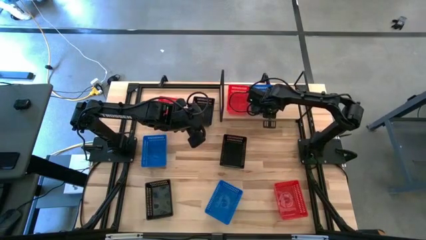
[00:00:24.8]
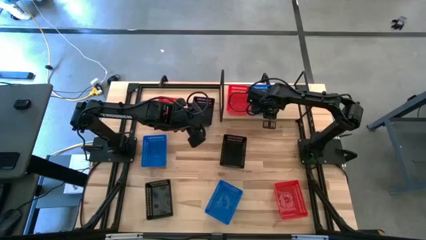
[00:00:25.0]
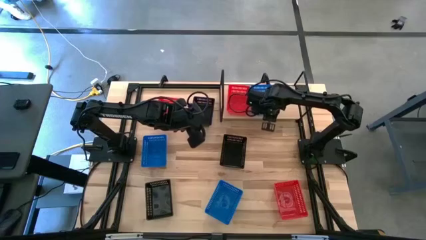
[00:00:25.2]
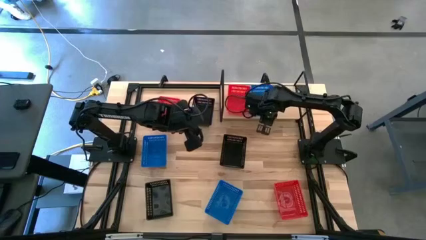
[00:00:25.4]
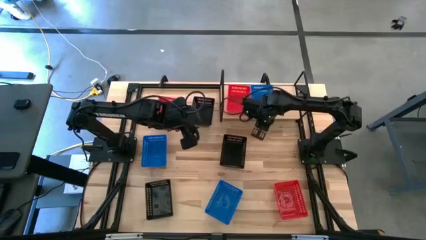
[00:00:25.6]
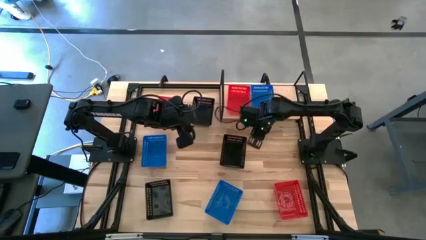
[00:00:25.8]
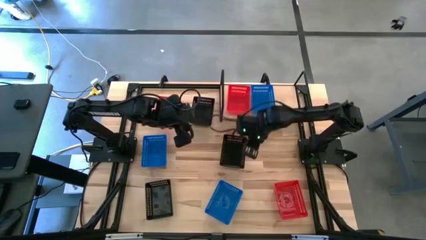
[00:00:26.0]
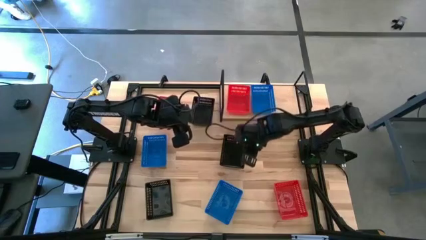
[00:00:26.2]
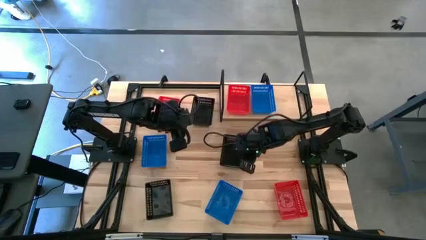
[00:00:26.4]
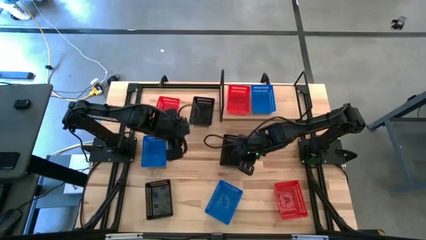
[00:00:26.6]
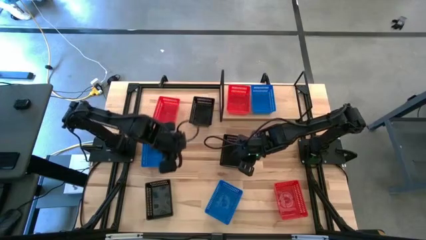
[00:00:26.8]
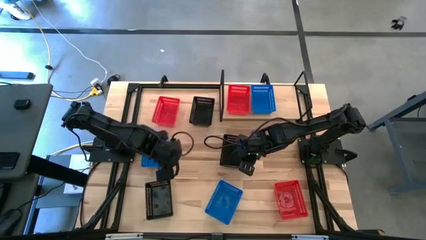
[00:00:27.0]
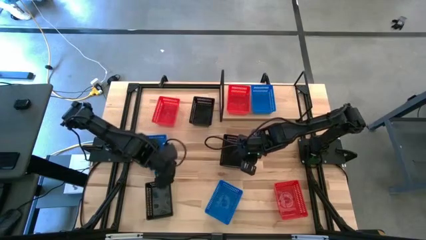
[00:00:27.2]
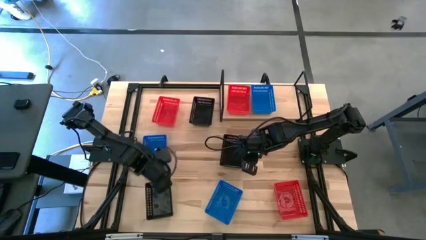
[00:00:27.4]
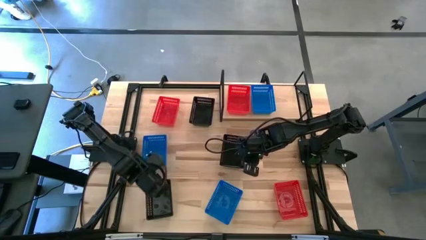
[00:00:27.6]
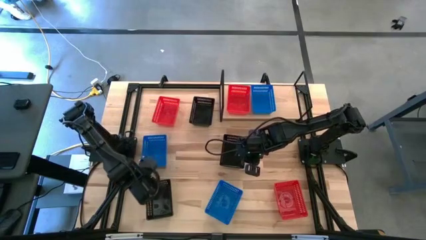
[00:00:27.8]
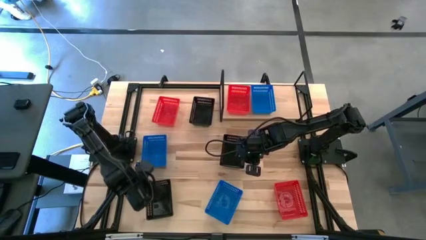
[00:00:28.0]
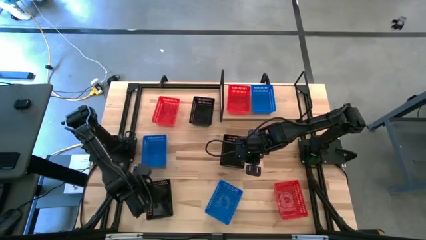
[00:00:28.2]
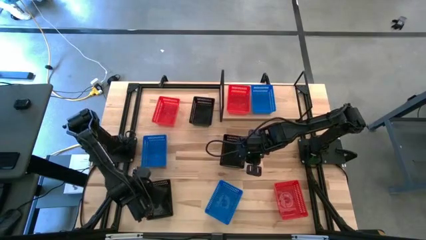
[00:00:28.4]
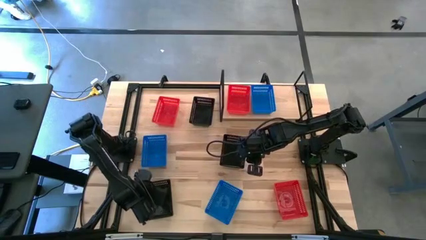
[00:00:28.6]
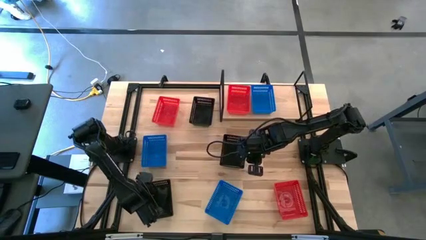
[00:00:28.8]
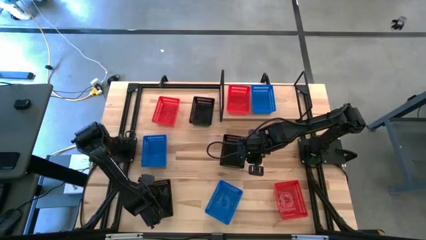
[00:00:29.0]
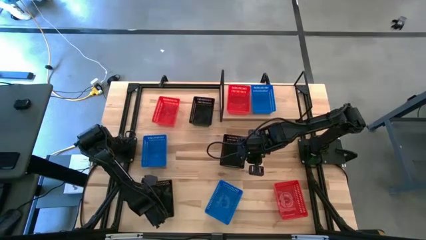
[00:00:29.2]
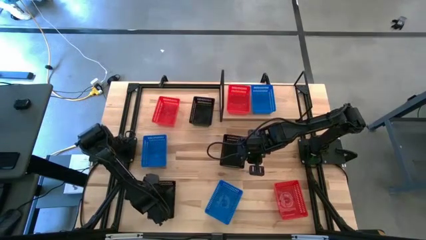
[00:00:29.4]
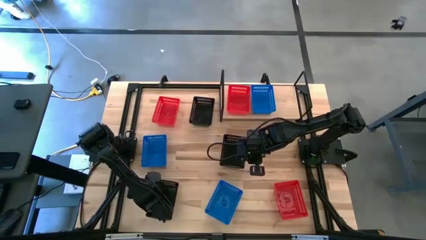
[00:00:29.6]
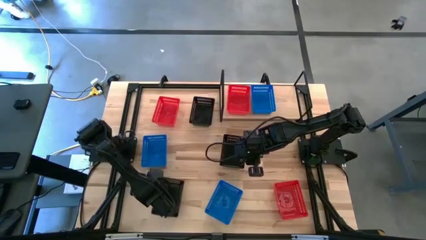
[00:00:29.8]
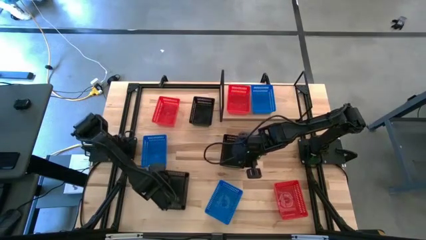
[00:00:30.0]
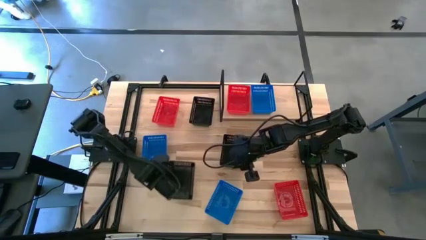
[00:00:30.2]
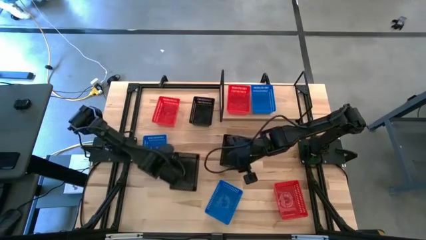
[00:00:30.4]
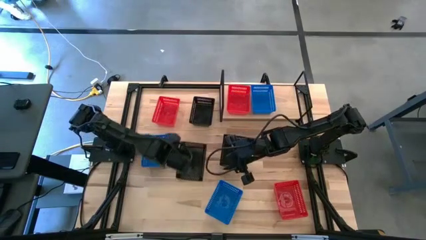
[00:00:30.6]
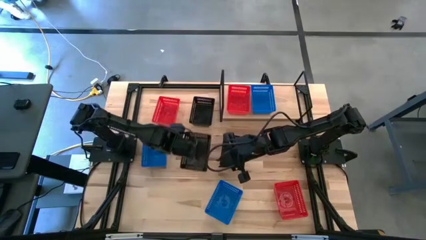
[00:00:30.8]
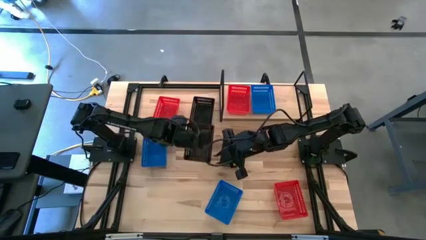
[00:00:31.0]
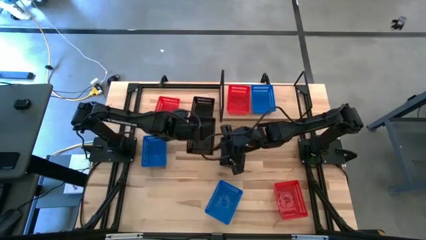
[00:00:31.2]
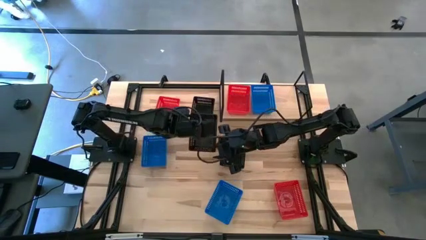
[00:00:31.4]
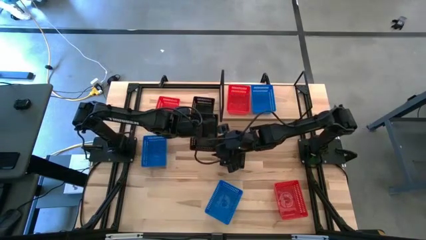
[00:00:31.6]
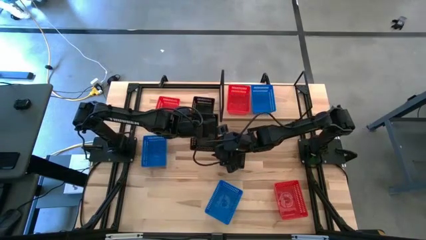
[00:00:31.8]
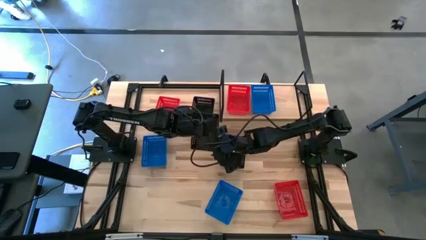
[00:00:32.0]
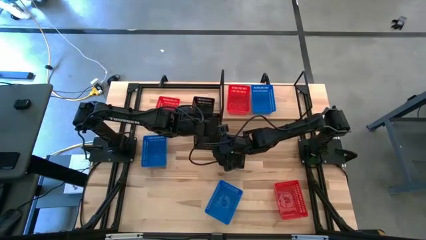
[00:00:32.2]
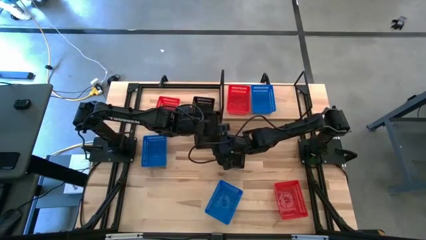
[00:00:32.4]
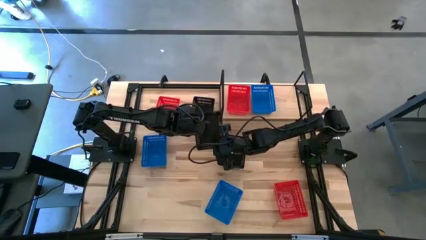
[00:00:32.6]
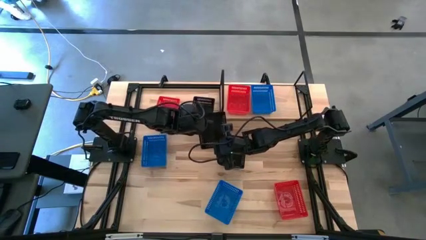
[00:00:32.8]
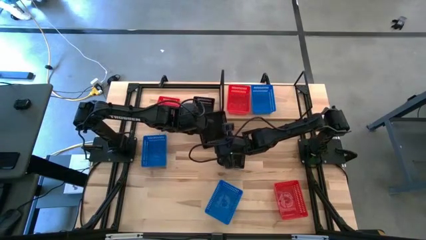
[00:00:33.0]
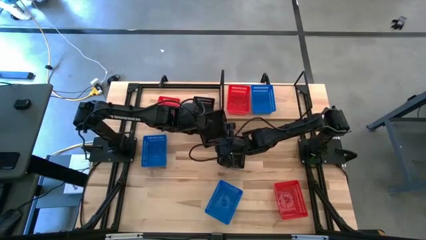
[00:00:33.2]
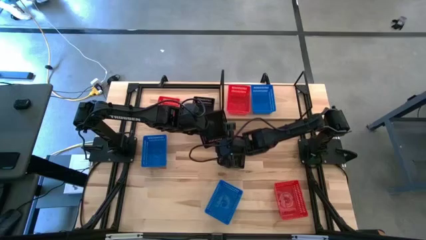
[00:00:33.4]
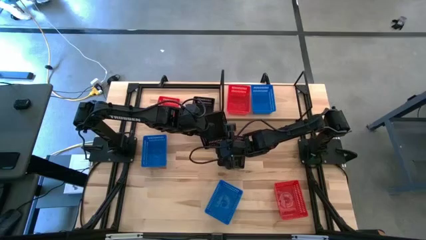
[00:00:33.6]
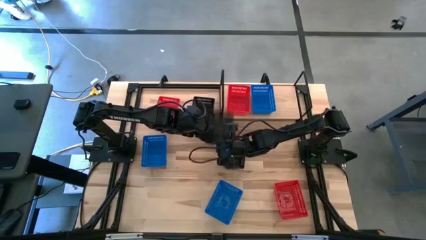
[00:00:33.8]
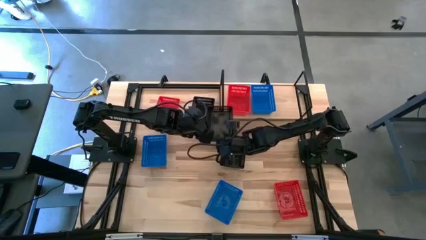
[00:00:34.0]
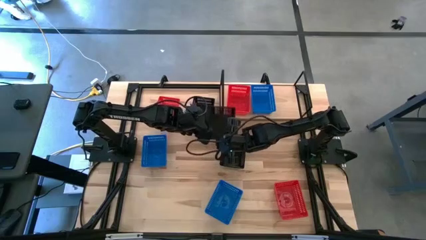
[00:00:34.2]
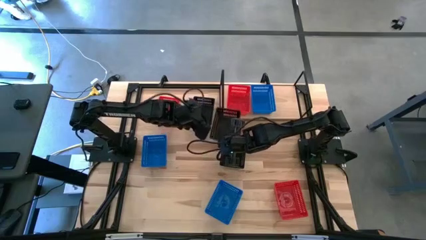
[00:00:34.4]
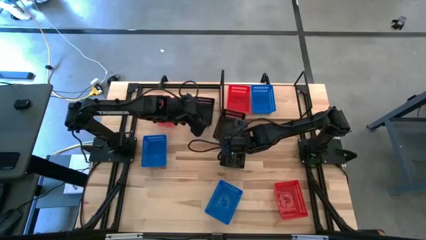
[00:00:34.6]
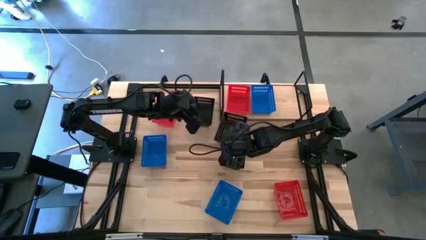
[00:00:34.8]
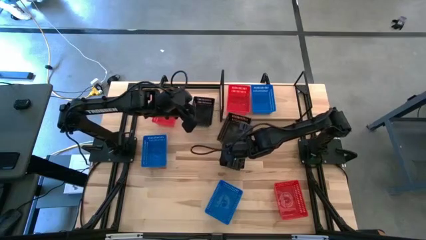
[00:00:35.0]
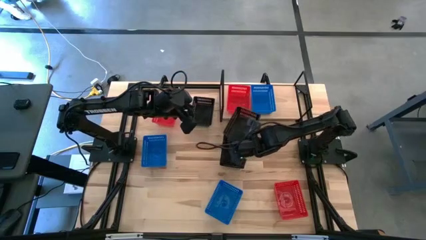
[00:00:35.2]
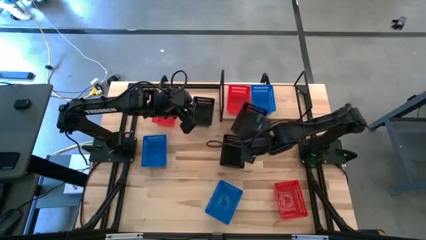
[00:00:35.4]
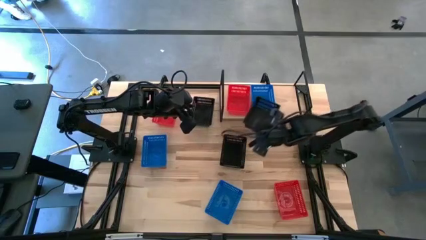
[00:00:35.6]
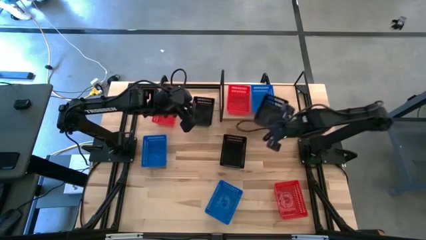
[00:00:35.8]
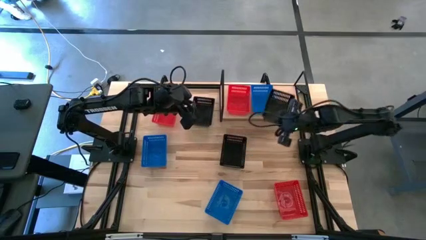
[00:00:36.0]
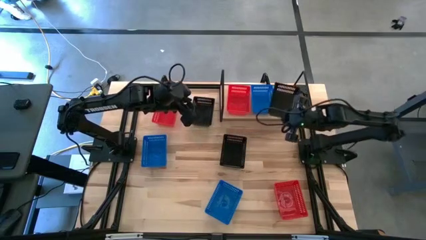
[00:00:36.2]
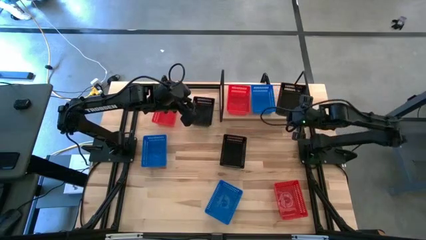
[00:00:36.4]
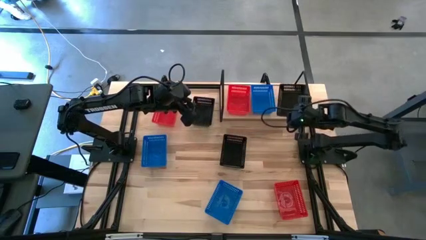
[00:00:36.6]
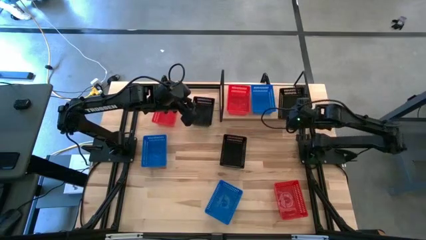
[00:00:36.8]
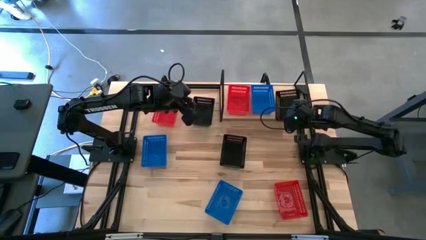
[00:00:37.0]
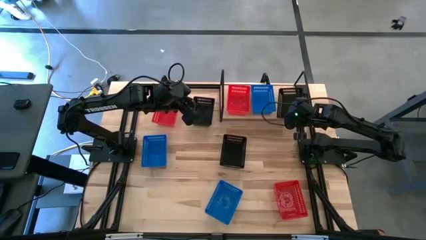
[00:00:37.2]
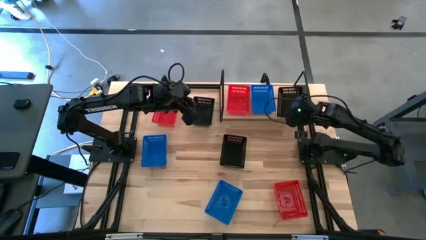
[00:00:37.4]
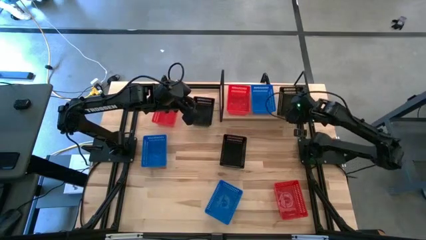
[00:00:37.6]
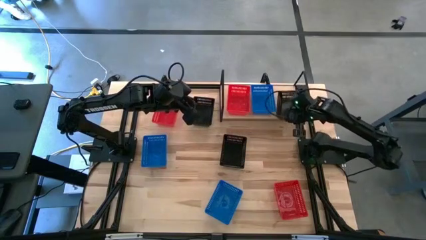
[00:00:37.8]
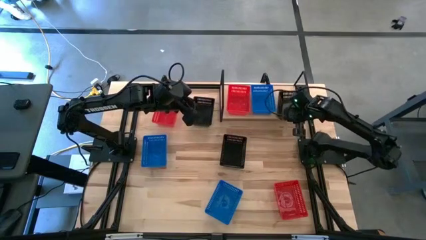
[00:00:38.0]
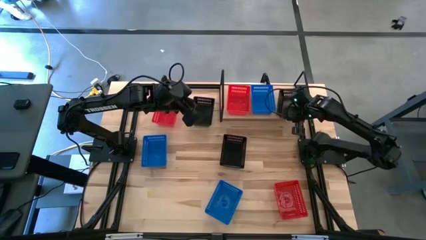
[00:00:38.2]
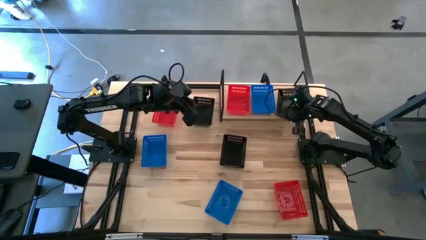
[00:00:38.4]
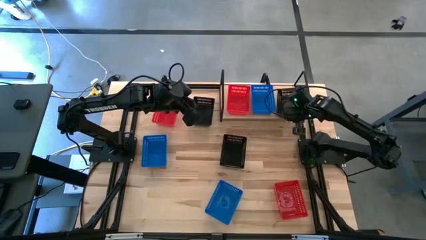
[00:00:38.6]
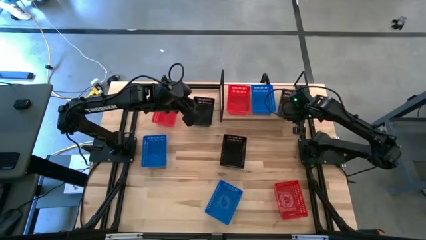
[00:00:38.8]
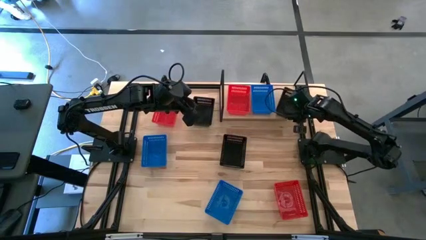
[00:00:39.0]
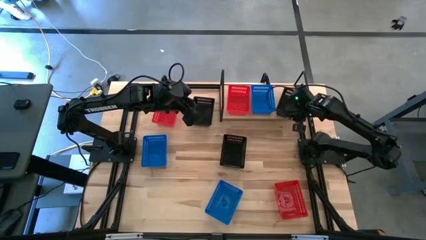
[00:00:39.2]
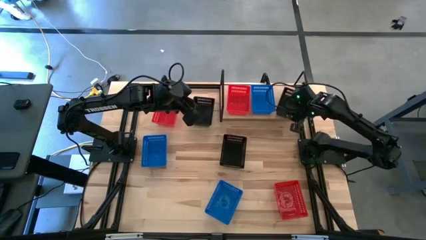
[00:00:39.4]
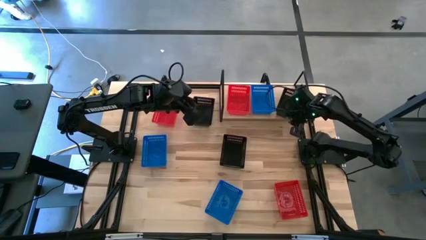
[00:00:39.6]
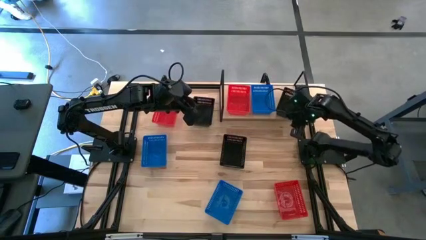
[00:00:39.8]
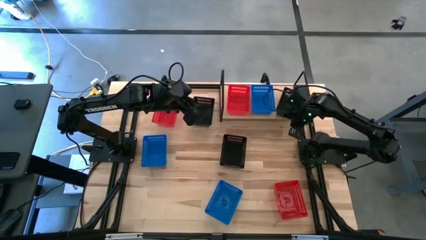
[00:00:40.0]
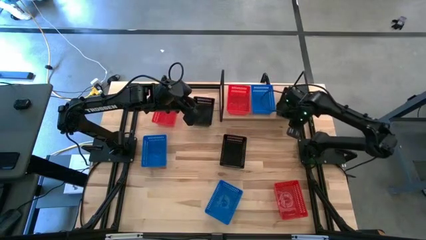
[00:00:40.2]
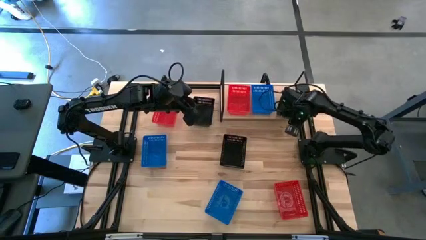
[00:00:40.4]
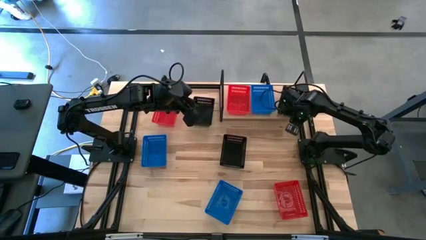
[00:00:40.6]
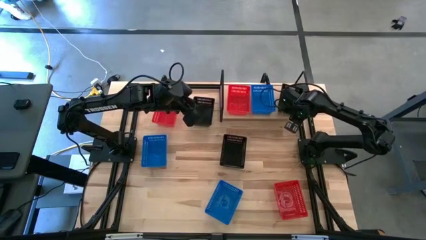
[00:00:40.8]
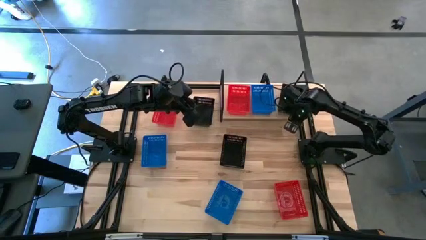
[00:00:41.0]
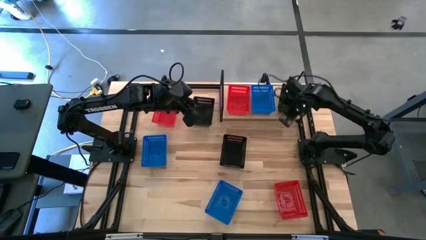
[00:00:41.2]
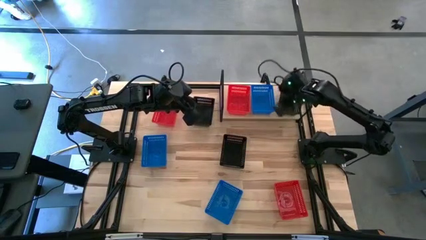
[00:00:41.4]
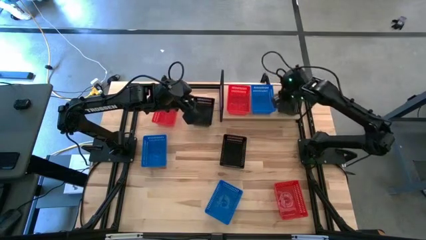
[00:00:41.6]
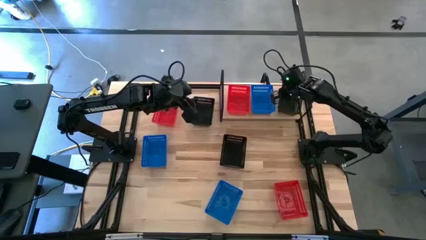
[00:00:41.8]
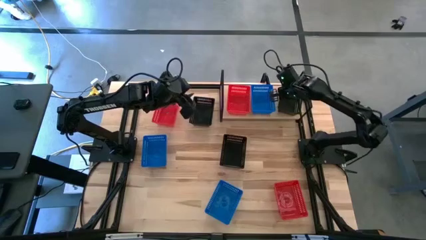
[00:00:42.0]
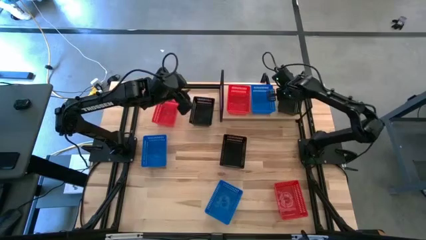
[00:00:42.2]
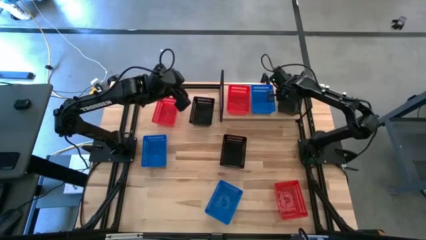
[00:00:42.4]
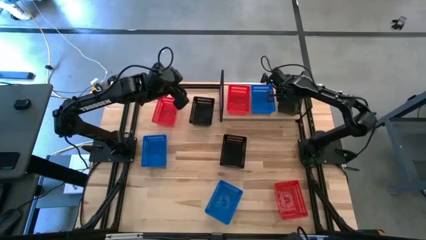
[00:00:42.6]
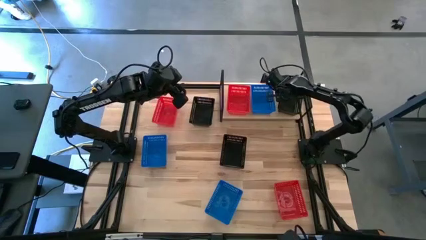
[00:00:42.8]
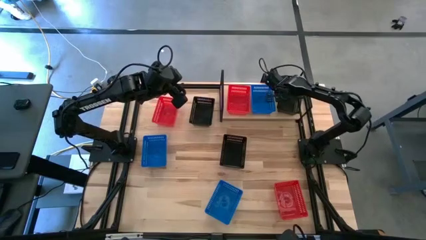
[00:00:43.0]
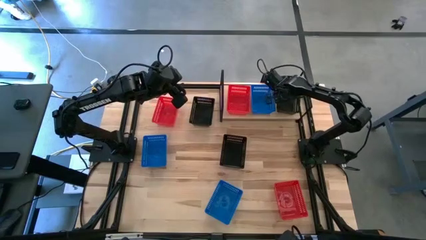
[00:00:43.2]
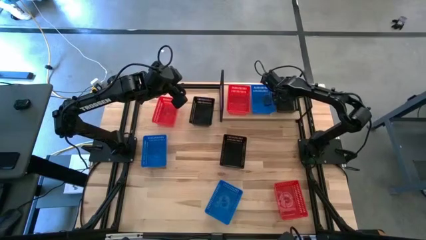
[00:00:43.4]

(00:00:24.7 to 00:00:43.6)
Task: Stack baskets on shelf by color
Put the bottom black bin on the shelf
